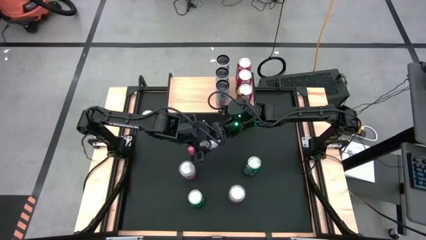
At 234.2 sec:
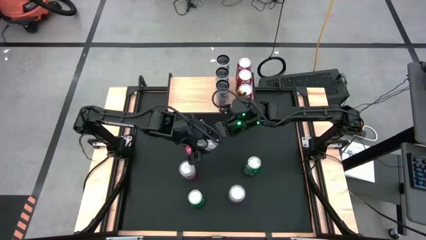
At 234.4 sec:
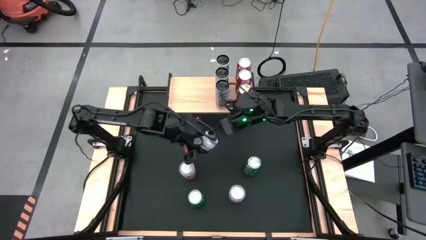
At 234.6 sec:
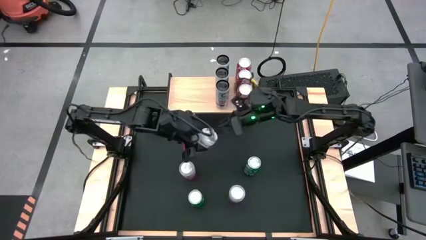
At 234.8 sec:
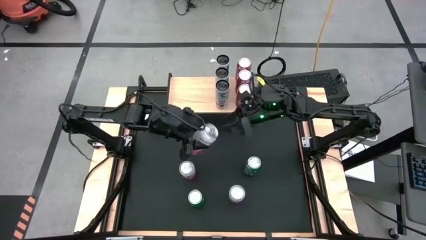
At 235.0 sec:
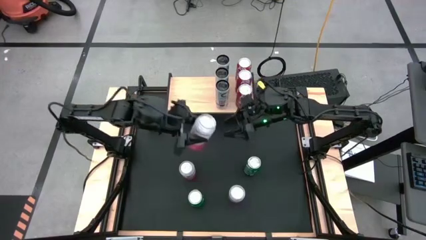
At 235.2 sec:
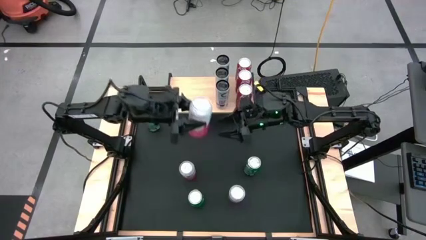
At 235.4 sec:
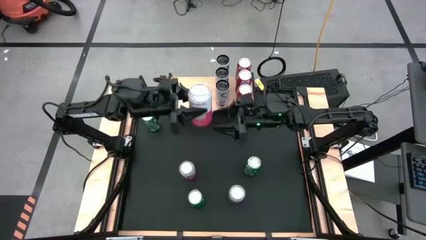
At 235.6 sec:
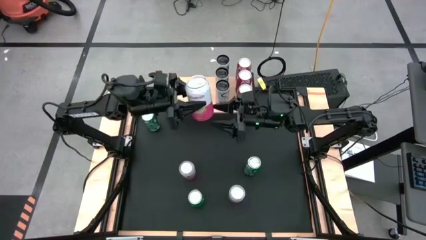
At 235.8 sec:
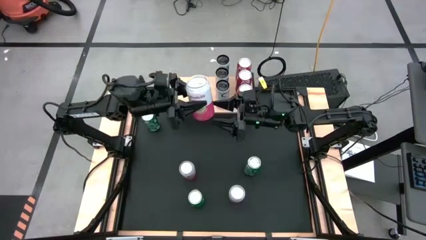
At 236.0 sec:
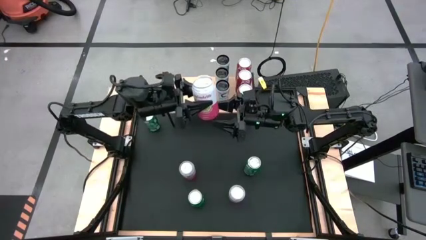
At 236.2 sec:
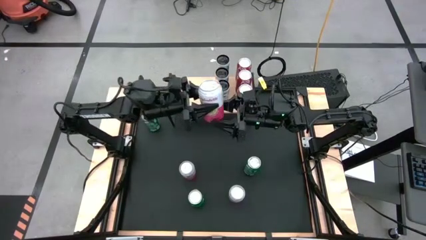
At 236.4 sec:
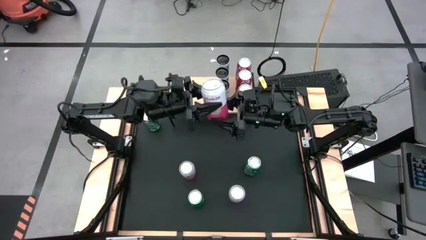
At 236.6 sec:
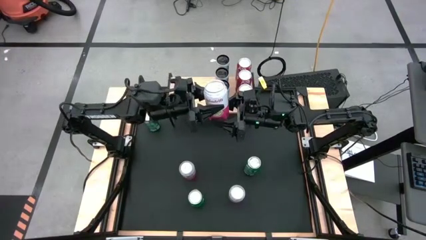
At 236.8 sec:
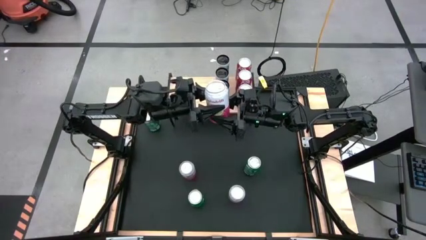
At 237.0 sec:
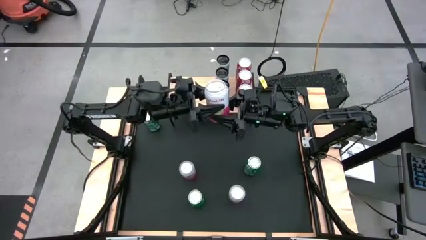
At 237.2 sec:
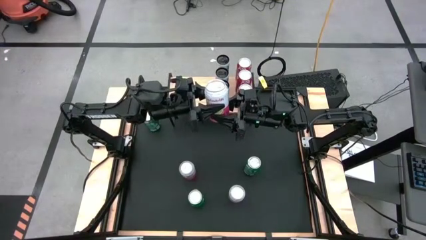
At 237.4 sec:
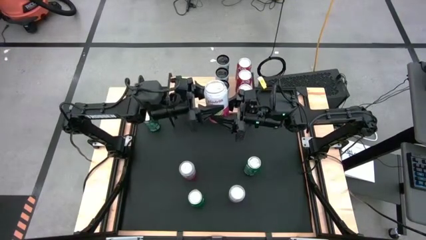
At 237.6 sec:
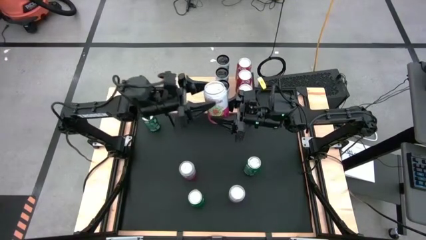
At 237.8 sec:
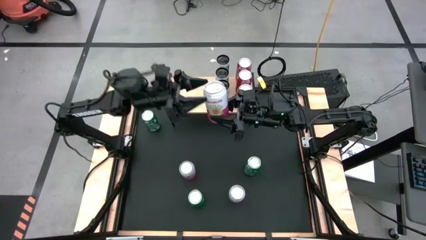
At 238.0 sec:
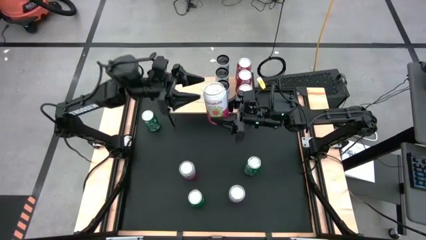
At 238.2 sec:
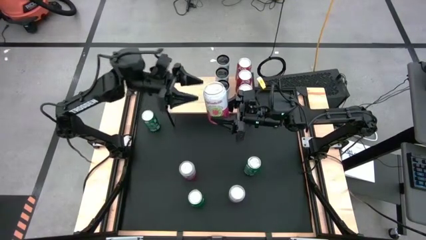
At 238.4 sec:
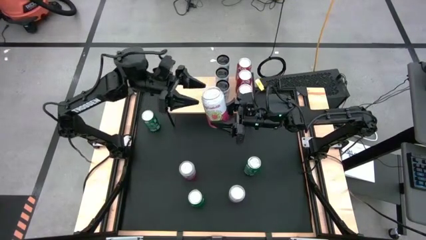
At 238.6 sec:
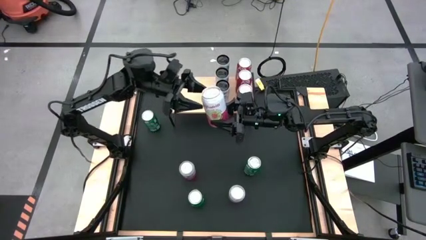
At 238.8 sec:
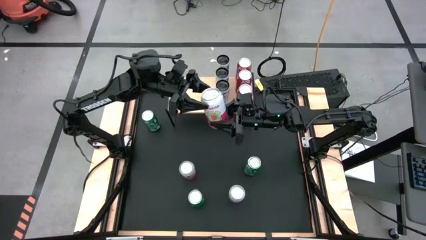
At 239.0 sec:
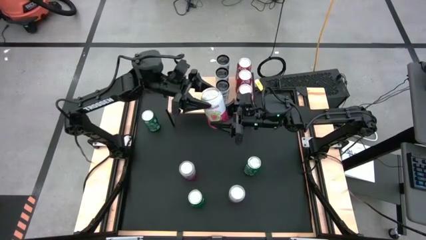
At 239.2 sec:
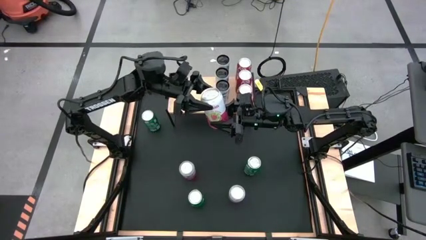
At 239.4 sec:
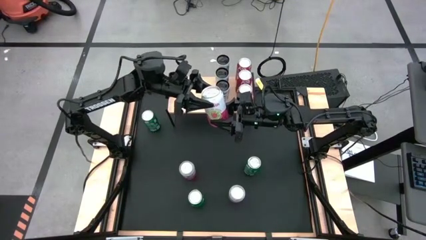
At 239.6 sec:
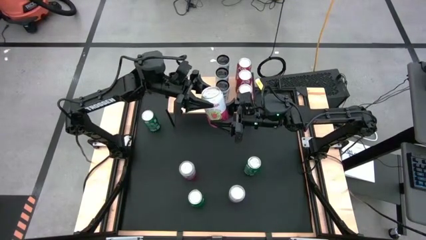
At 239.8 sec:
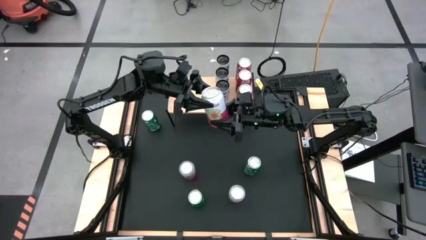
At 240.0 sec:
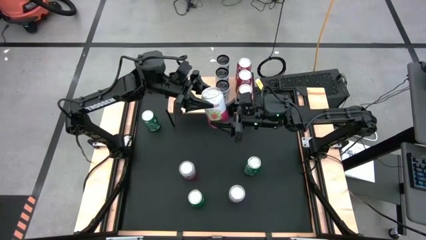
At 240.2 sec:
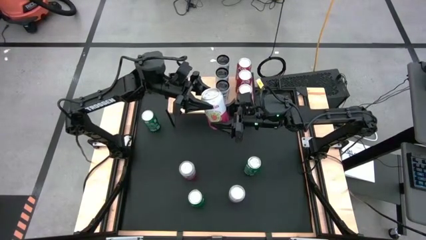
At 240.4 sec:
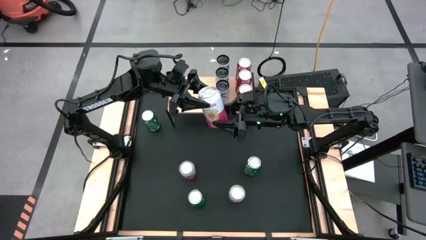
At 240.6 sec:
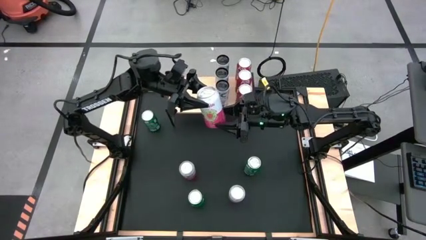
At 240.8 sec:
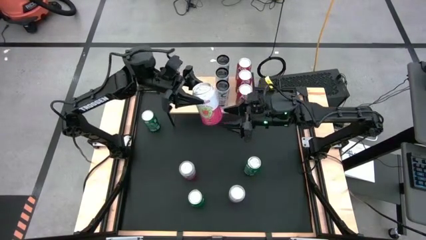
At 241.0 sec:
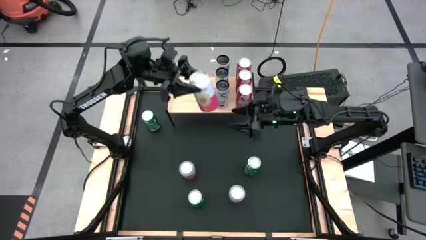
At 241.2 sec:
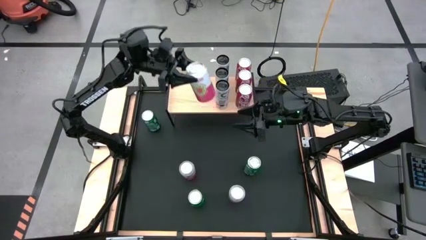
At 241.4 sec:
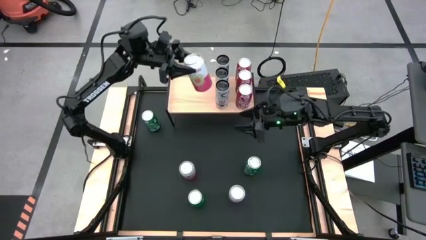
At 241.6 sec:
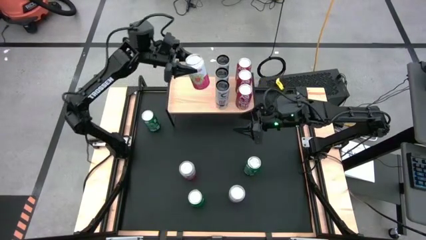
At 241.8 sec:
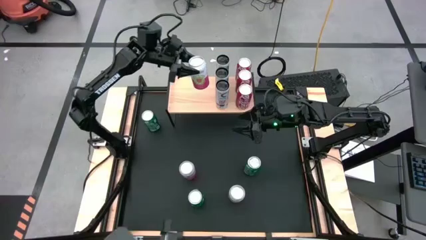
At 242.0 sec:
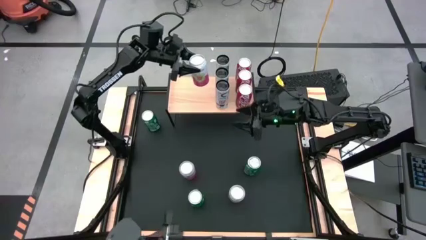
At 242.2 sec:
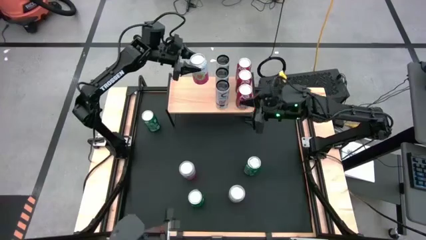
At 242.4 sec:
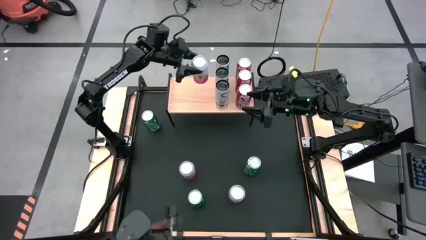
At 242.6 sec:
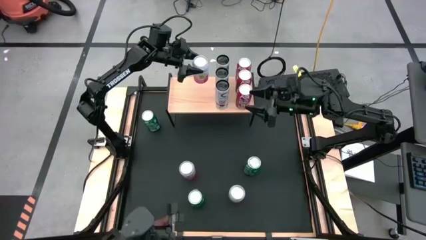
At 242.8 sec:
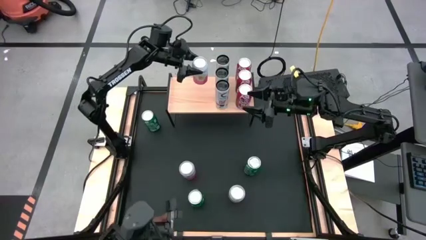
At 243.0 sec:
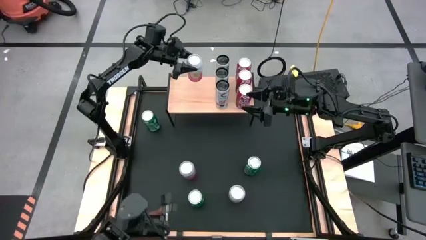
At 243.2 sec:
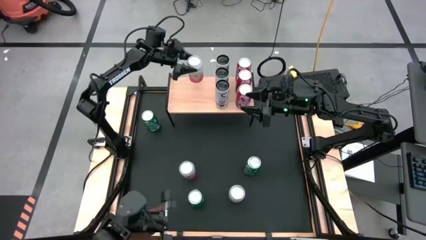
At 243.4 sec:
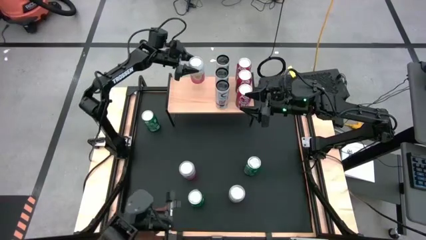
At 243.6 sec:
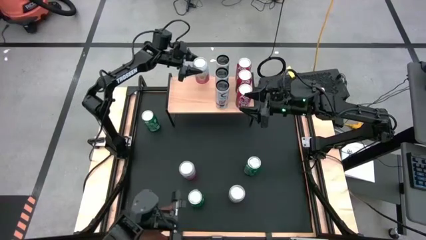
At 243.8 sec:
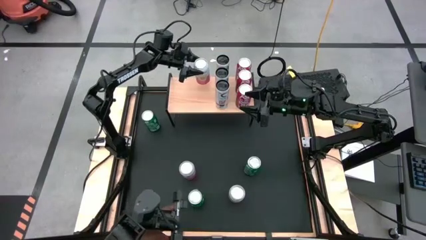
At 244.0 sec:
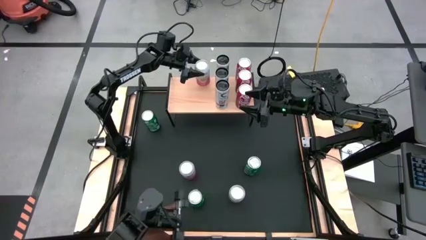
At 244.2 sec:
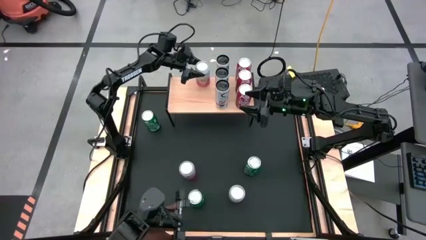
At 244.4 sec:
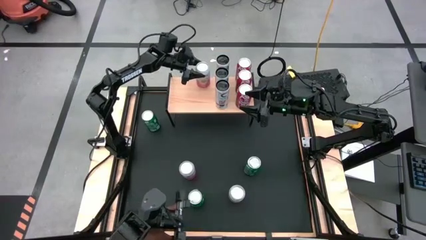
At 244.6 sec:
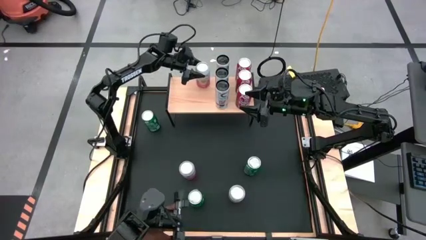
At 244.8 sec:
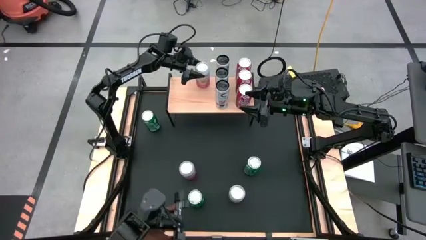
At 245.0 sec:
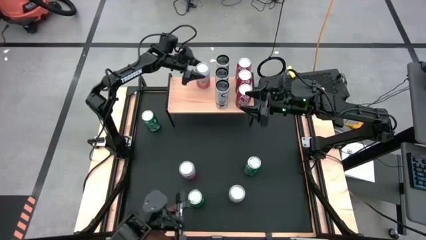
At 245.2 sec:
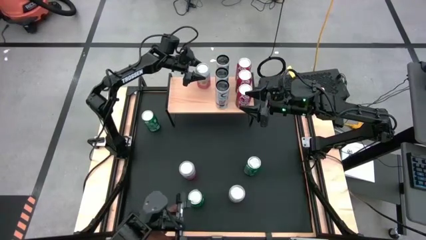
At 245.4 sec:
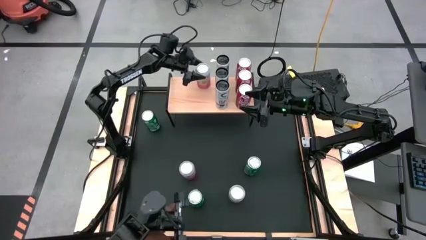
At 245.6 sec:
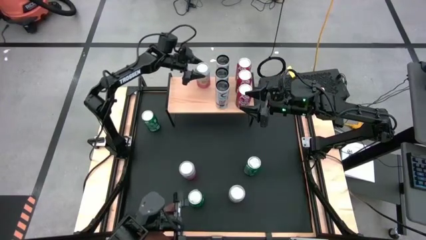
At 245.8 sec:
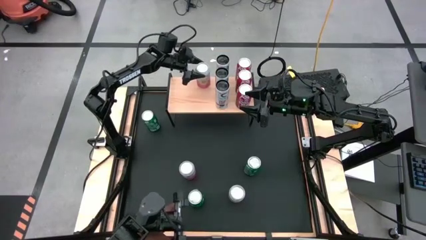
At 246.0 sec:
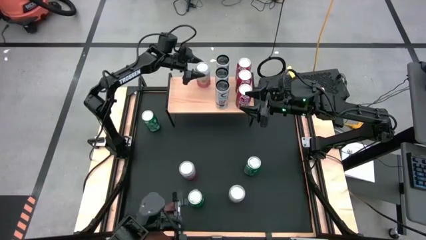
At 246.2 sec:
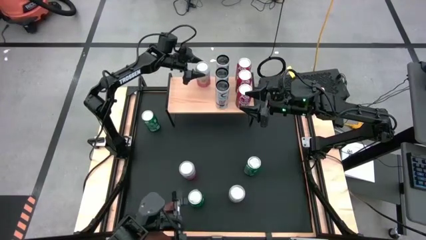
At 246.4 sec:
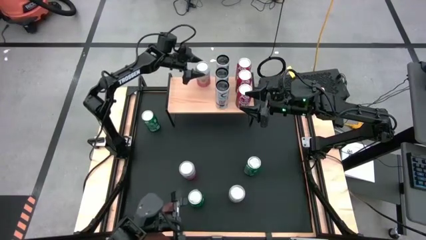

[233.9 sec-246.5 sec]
Task: Place canned beverage on shelf
Put the top pink white soda can on the shelf
